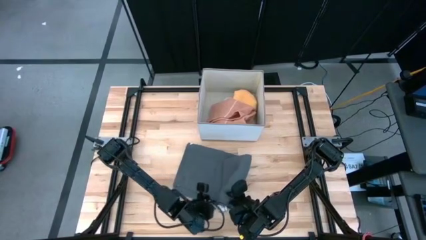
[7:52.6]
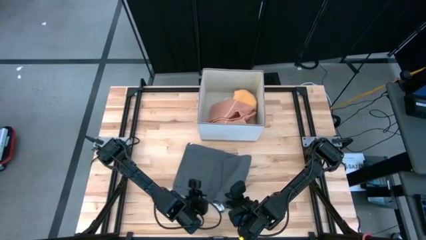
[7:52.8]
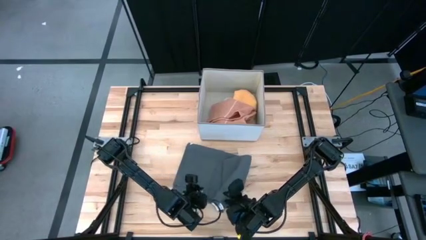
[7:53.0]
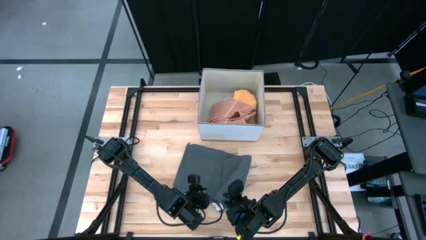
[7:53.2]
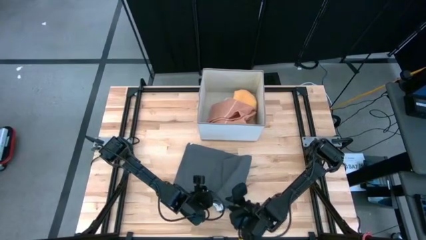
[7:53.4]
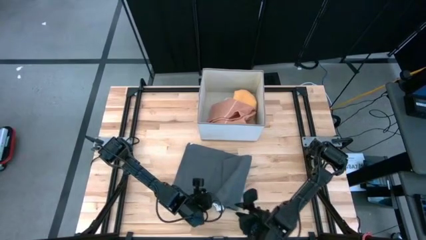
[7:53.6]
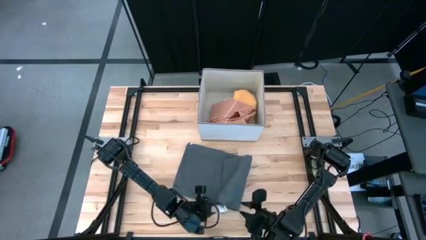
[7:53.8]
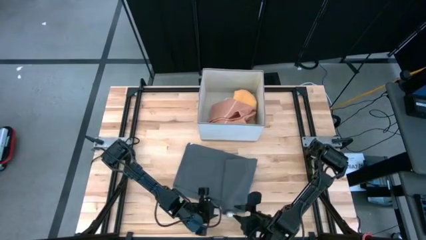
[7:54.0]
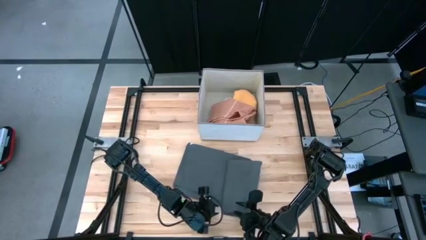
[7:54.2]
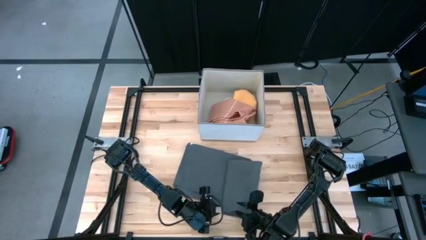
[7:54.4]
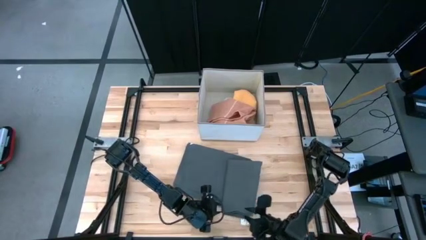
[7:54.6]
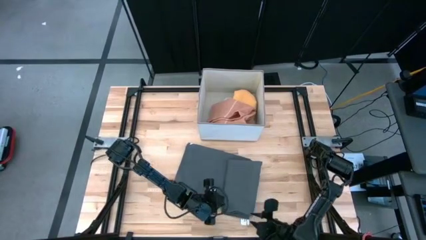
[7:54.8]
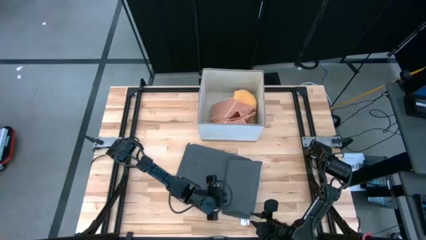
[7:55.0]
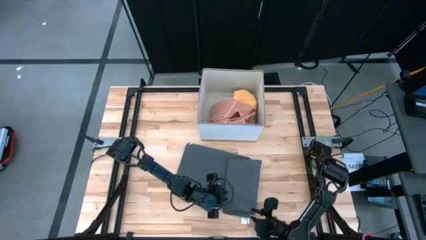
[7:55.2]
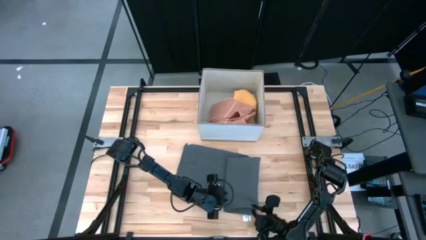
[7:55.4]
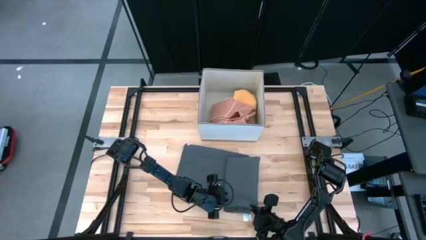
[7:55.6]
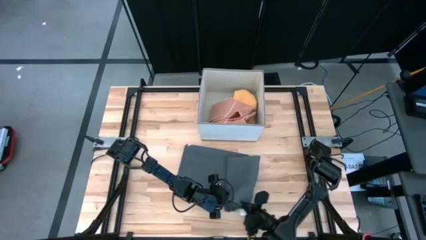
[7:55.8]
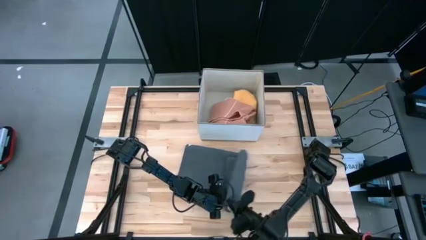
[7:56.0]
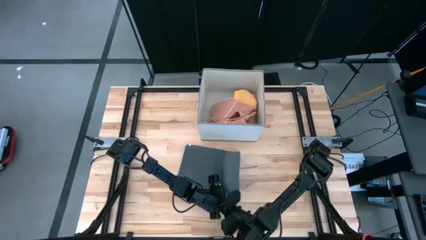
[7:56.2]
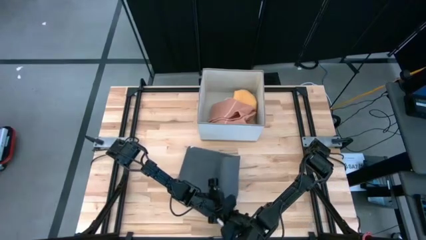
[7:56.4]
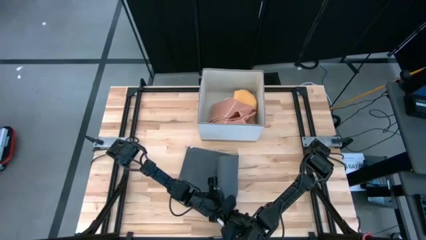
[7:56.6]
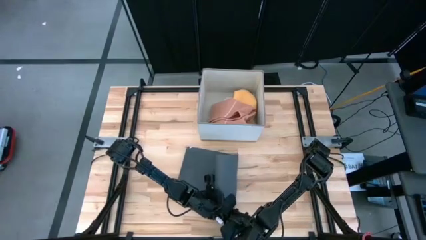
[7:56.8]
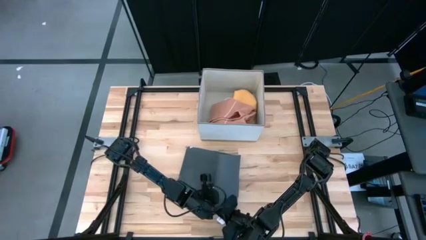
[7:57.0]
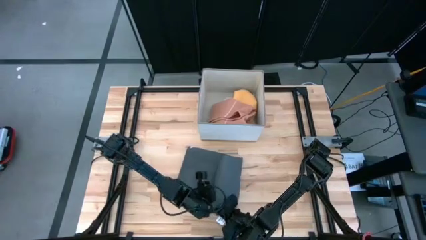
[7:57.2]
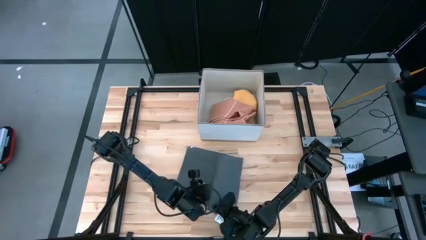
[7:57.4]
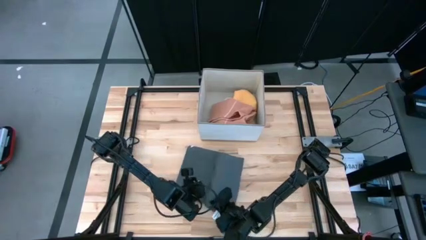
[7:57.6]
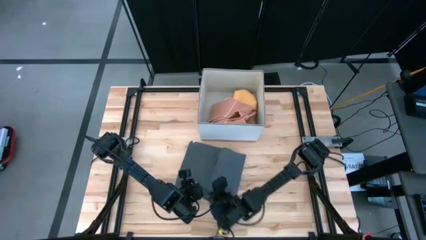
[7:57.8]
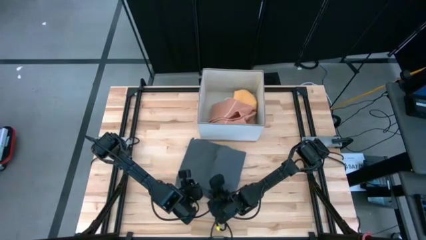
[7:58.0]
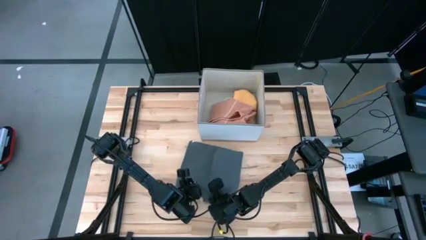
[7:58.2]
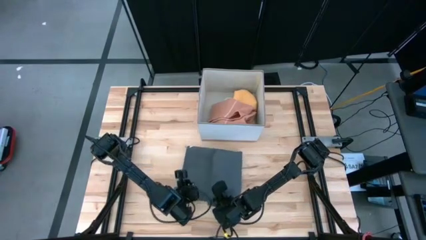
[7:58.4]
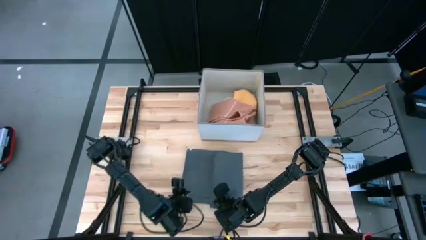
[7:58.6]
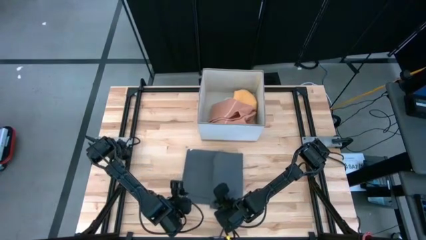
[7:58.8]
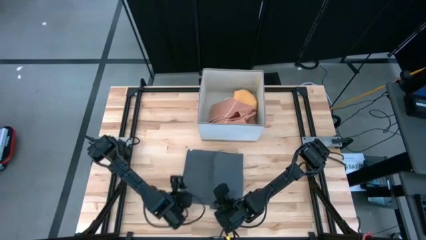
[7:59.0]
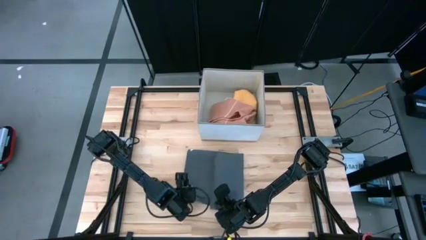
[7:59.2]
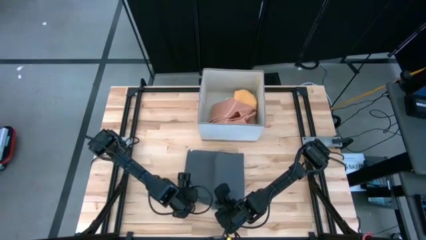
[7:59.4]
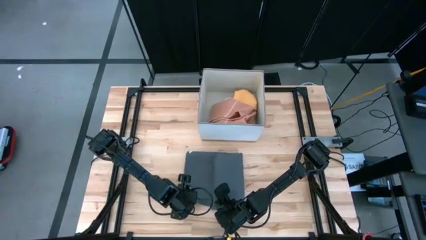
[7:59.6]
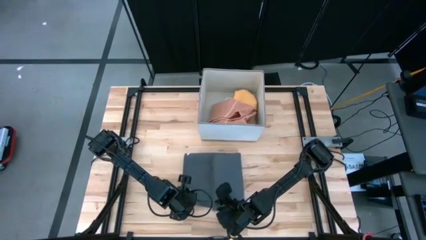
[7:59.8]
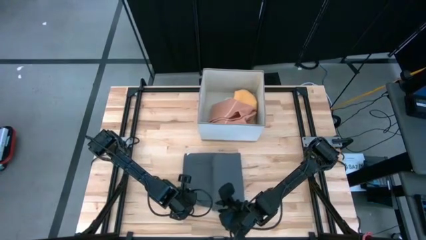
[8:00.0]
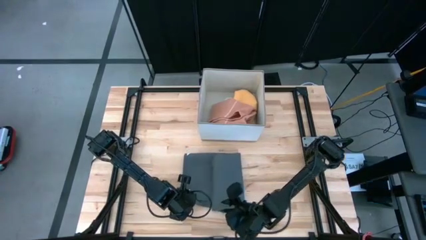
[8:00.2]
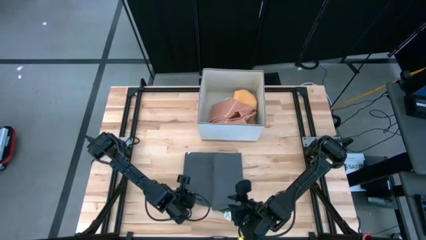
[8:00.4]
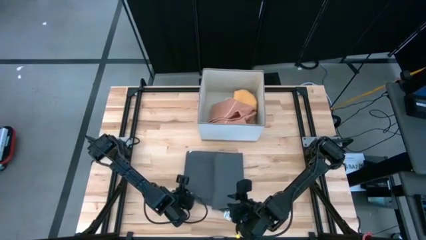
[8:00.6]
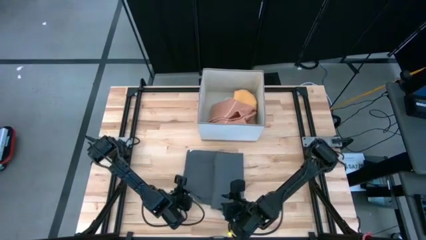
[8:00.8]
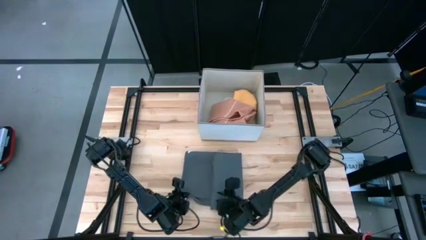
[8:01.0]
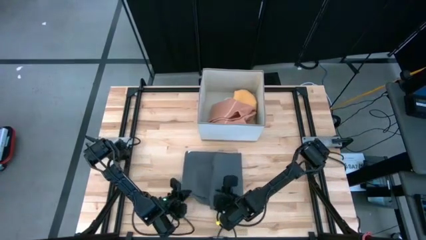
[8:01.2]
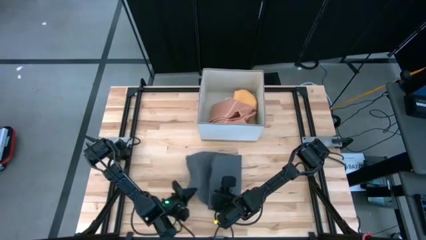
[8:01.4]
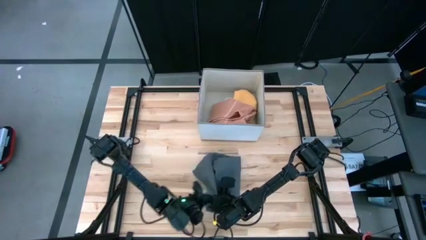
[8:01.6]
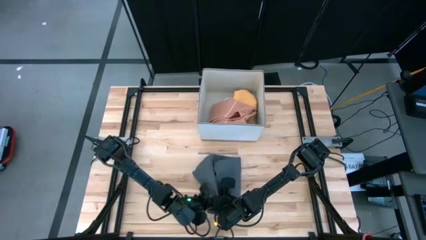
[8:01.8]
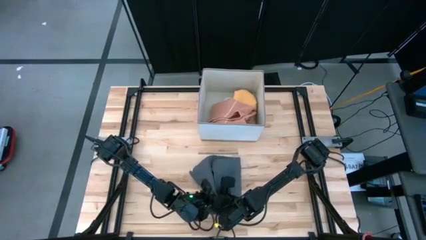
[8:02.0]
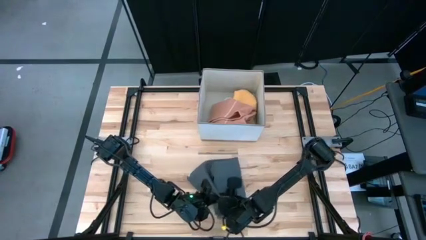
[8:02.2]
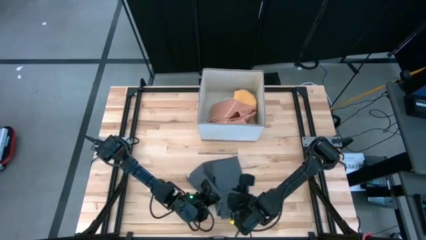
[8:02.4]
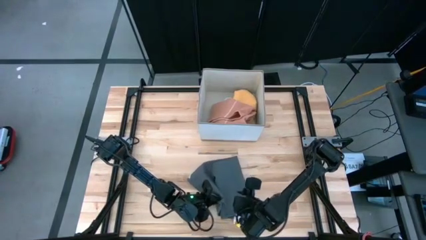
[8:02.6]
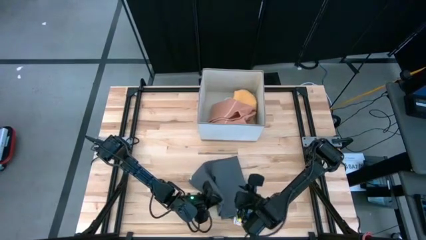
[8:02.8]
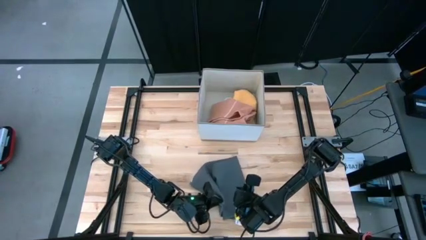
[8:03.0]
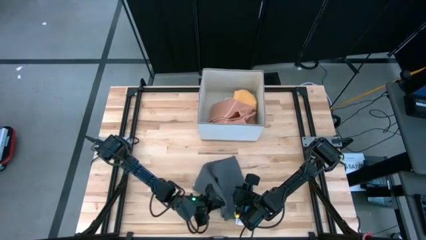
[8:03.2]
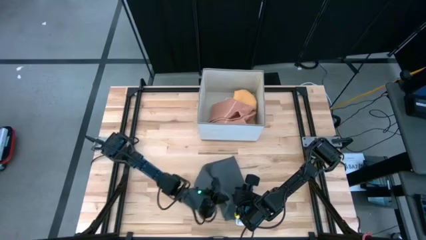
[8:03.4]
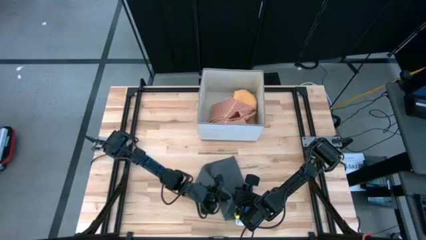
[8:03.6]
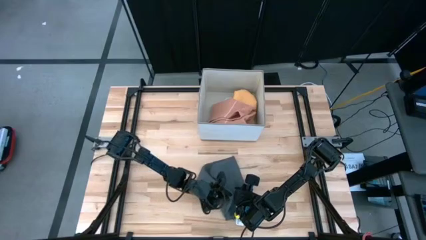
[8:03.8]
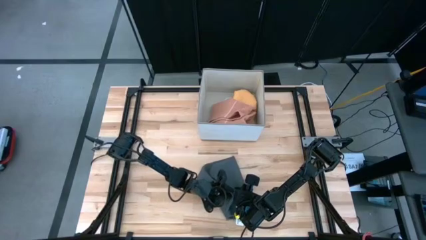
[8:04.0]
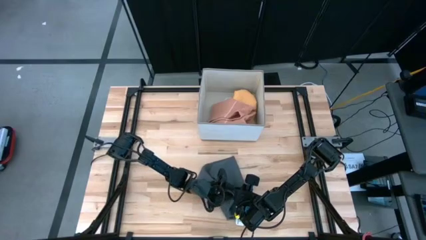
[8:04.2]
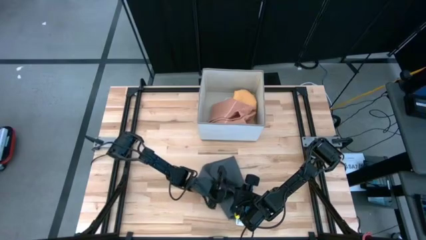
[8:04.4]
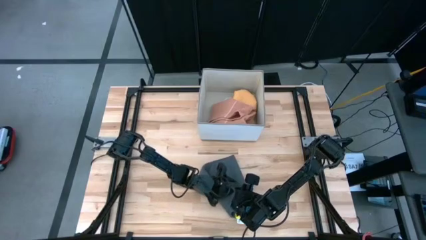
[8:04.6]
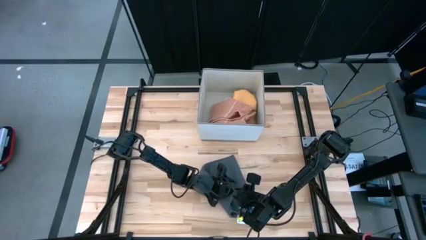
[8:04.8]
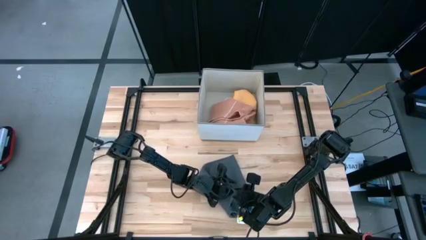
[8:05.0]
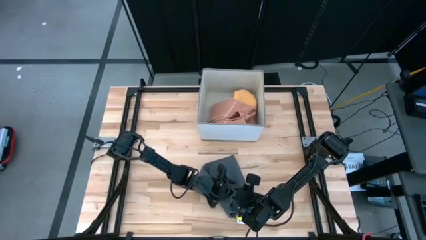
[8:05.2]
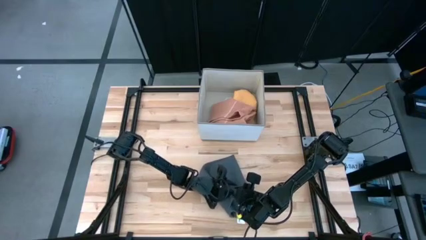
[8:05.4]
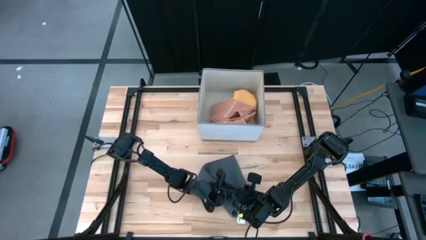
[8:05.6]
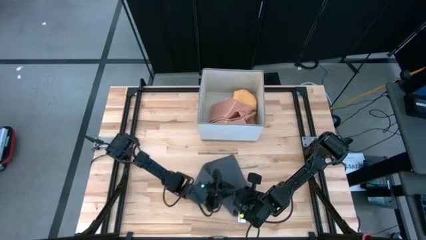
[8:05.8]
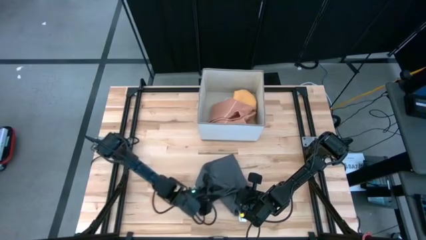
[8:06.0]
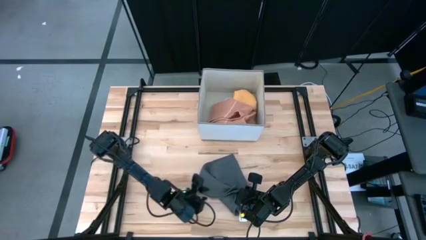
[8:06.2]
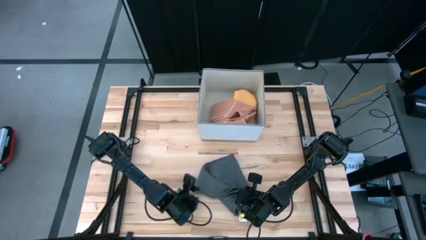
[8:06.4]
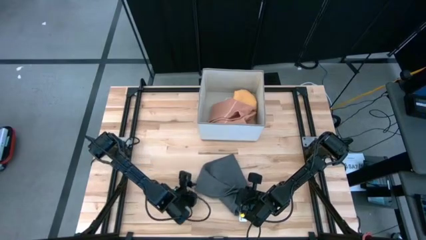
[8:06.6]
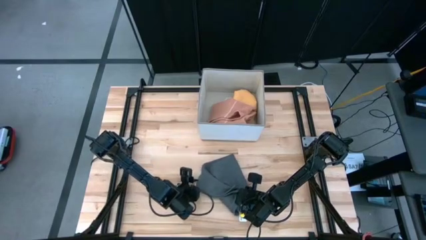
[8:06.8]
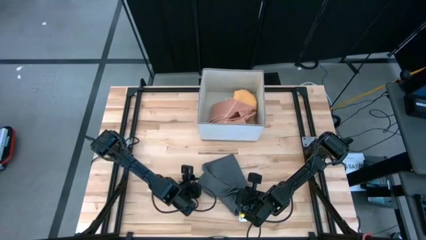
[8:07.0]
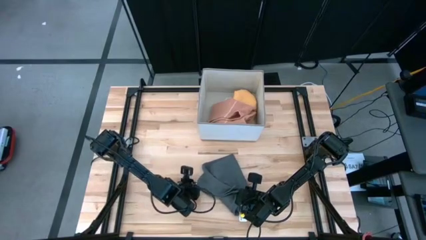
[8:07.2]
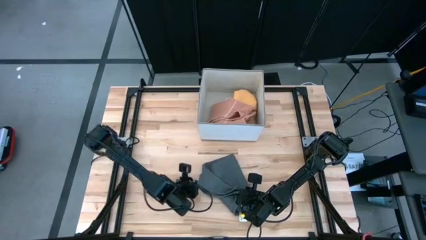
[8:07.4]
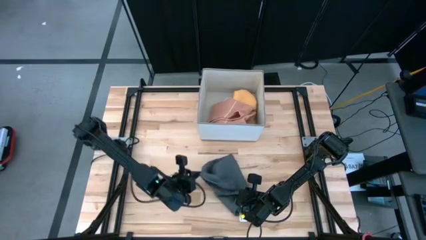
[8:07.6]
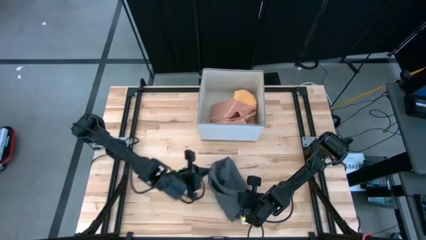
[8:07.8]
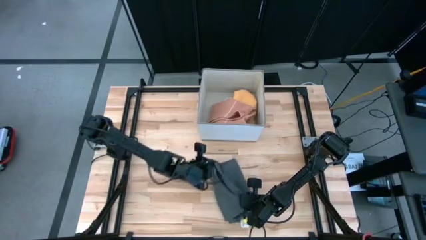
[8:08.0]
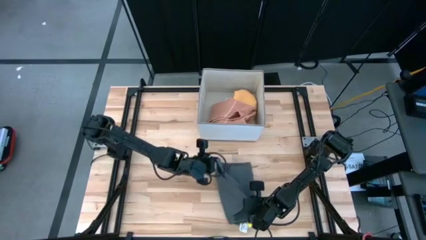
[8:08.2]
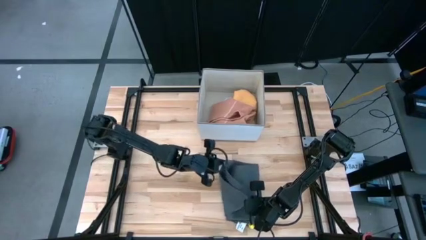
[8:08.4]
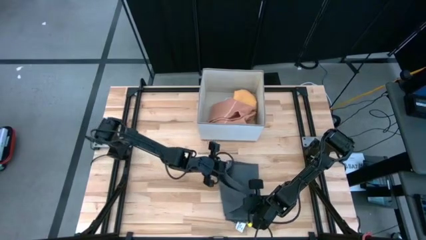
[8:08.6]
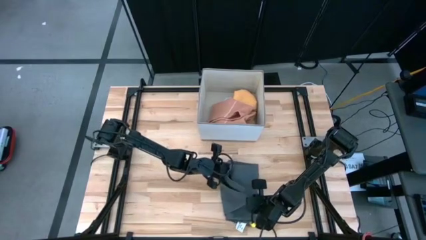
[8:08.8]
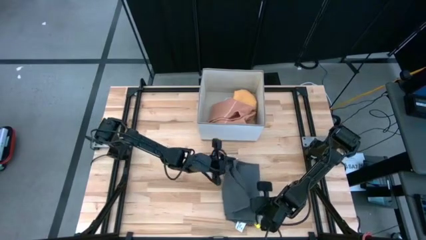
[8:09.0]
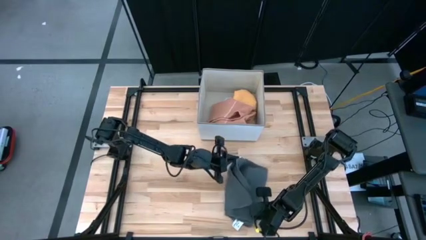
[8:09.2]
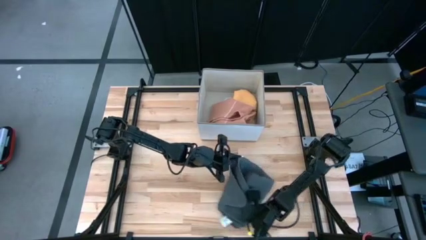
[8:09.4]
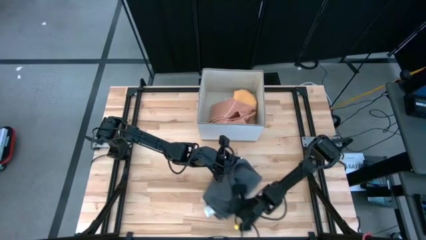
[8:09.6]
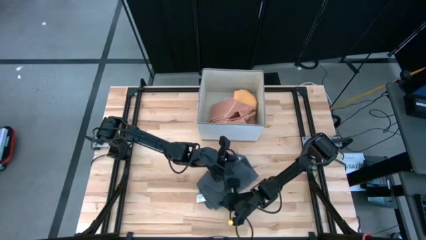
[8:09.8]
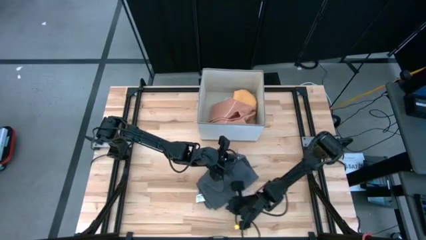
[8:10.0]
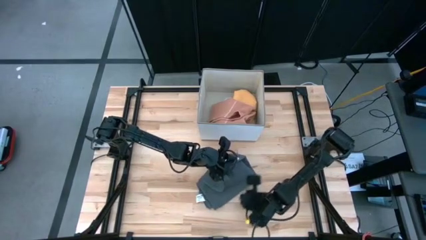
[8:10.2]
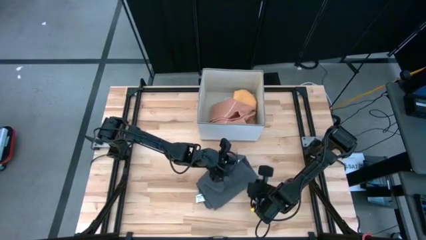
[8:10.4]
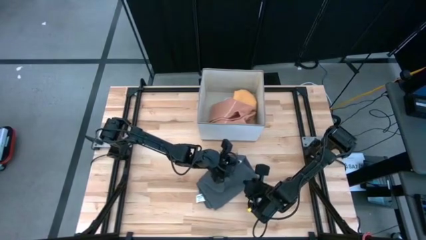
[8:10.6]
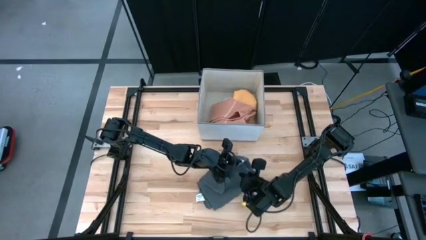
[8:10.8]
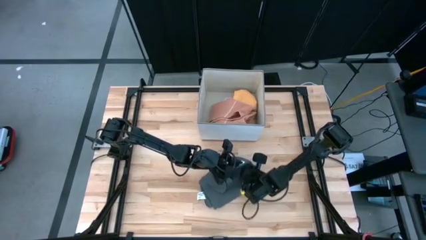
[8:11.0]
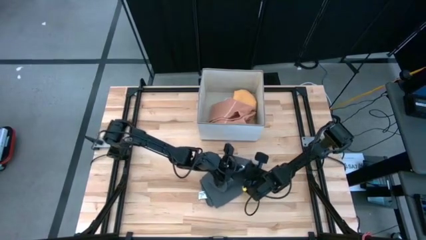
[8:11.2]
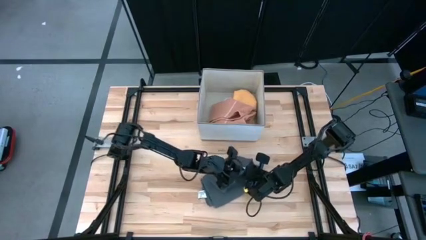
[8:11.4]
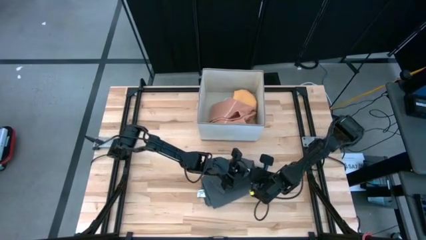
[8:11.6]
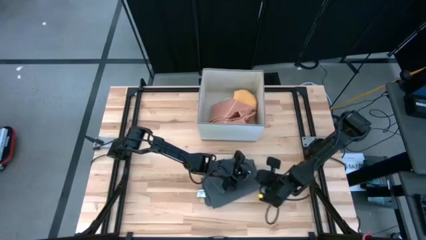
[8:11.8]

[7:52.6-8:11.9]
Task: Fold towel
Fold the dark gray towel
